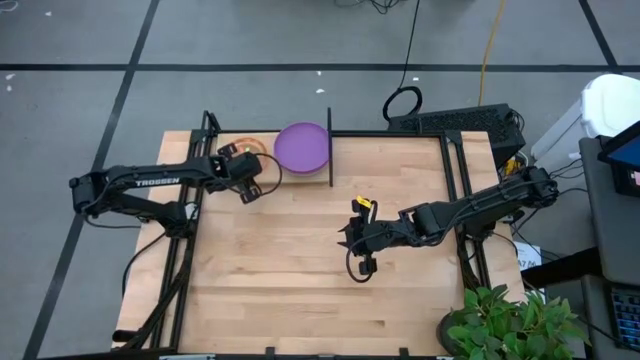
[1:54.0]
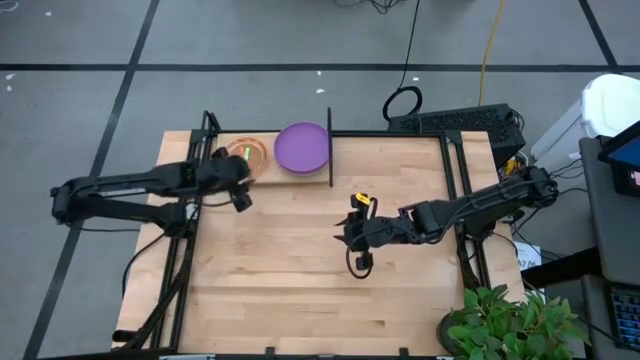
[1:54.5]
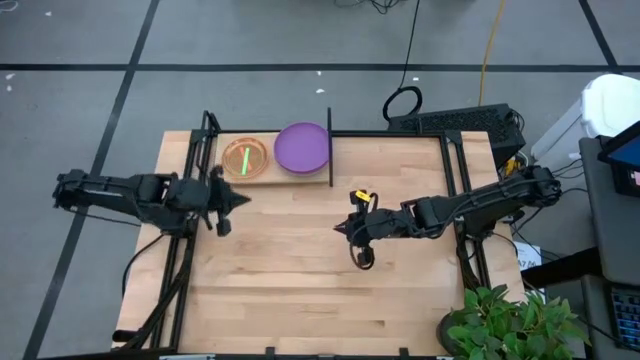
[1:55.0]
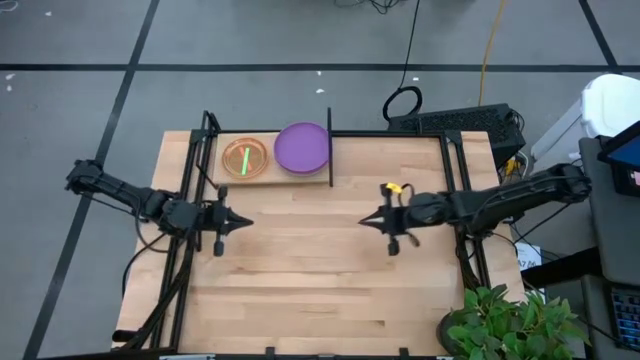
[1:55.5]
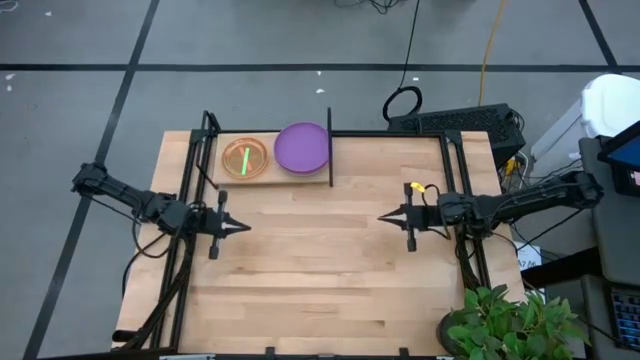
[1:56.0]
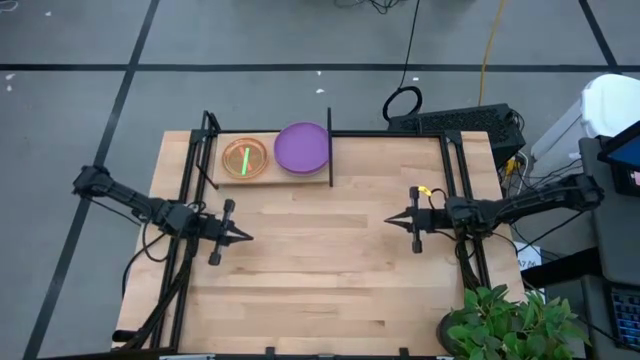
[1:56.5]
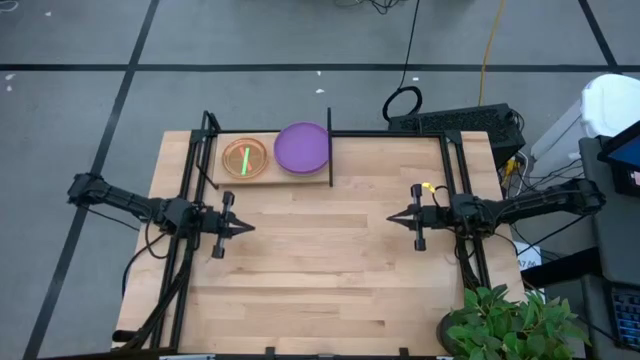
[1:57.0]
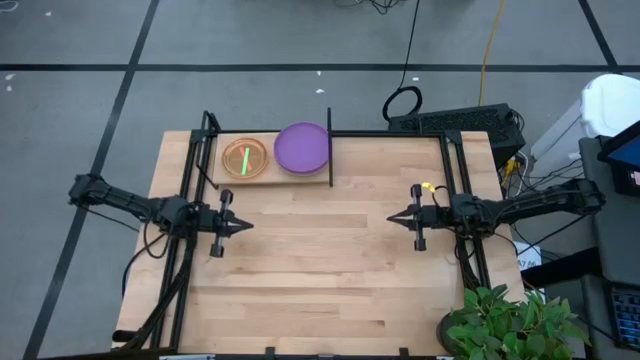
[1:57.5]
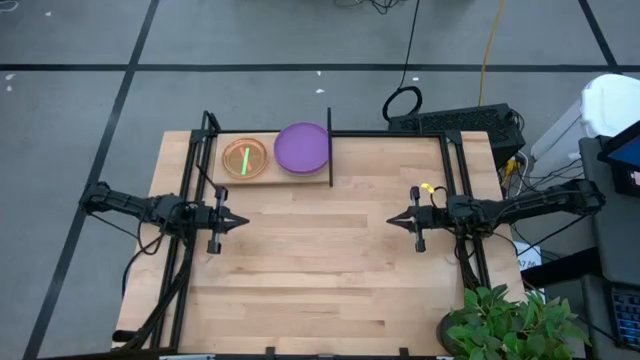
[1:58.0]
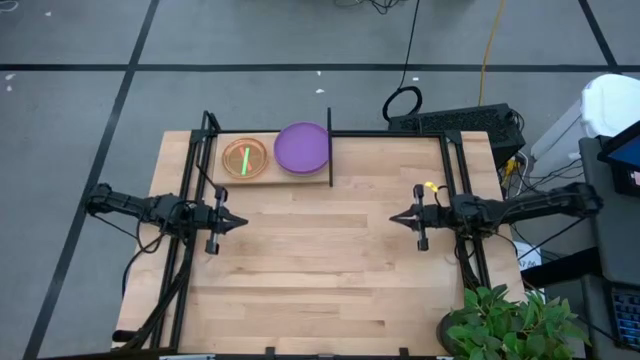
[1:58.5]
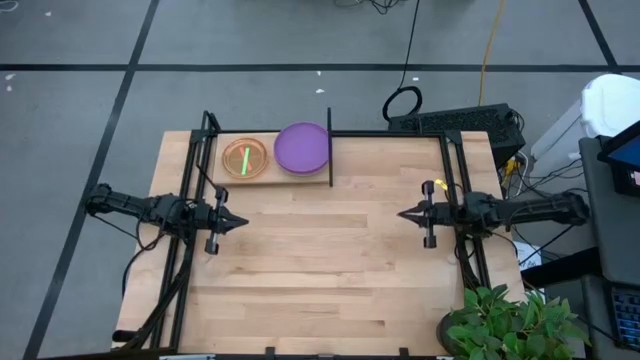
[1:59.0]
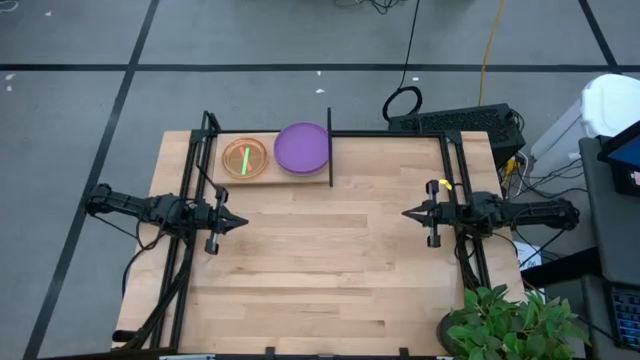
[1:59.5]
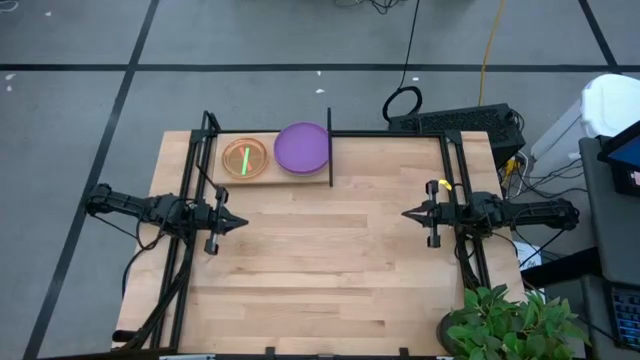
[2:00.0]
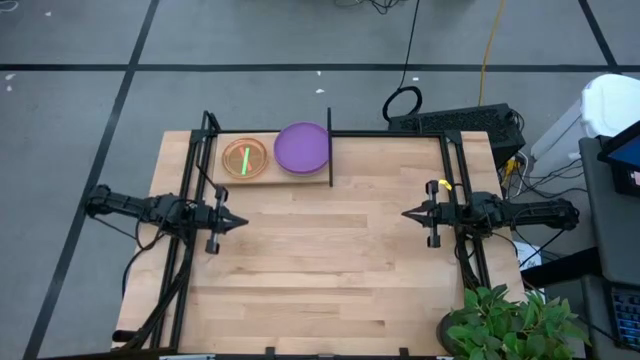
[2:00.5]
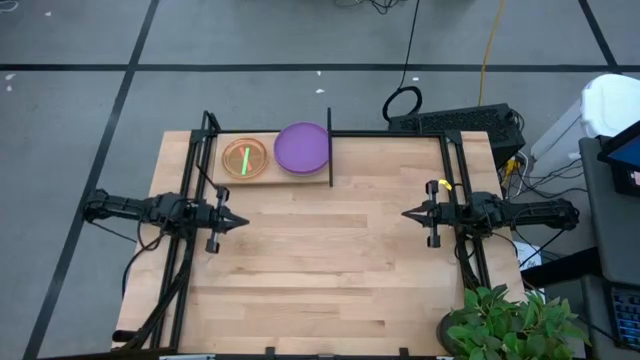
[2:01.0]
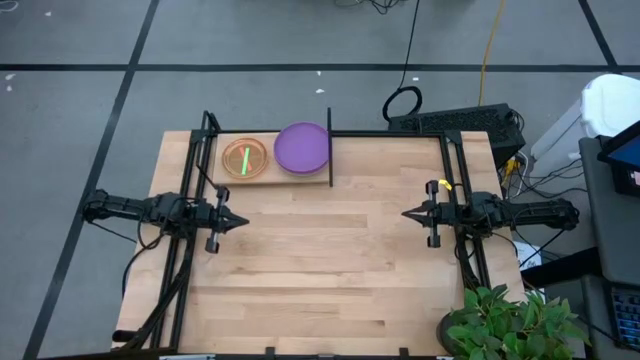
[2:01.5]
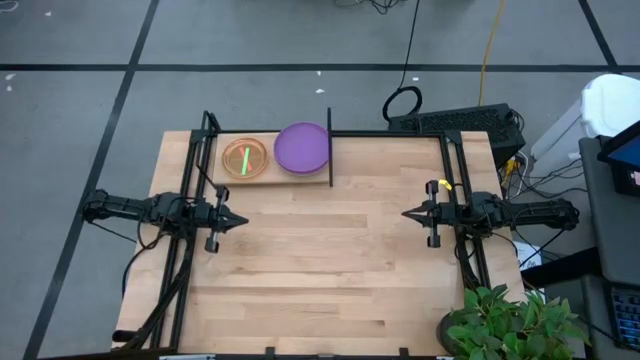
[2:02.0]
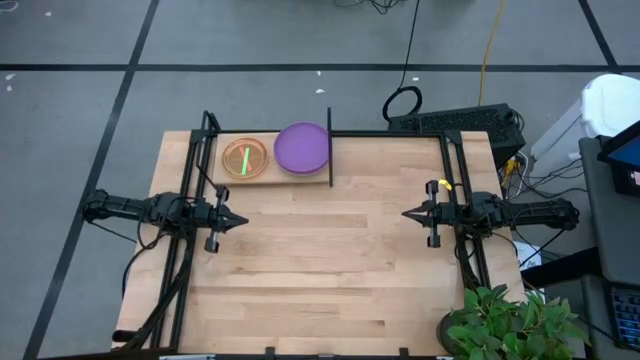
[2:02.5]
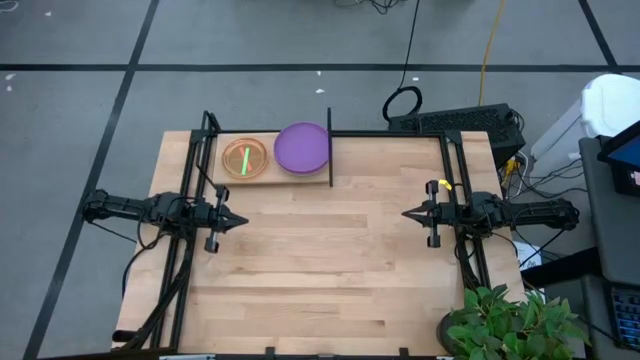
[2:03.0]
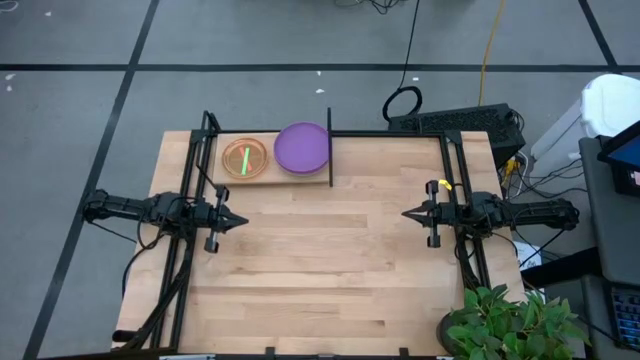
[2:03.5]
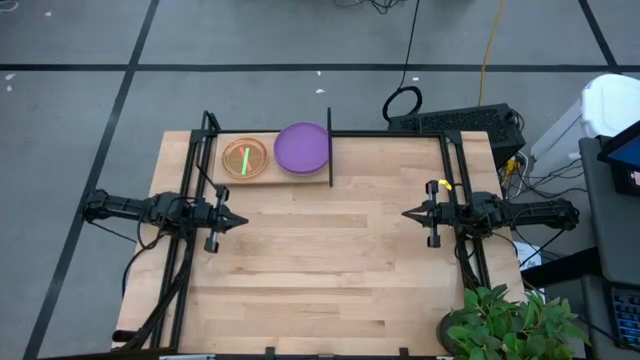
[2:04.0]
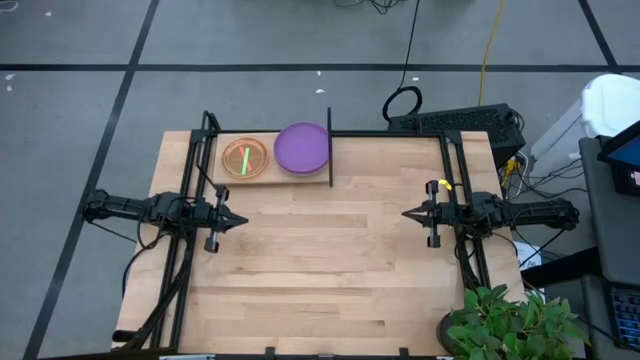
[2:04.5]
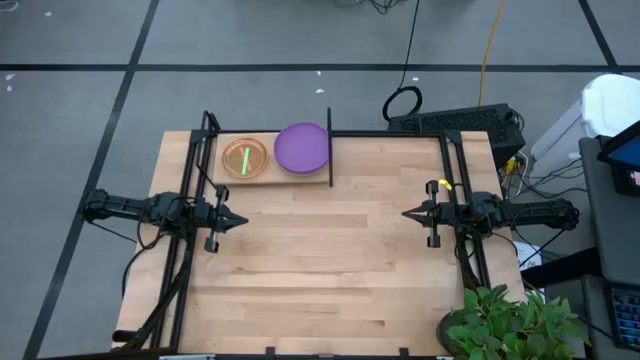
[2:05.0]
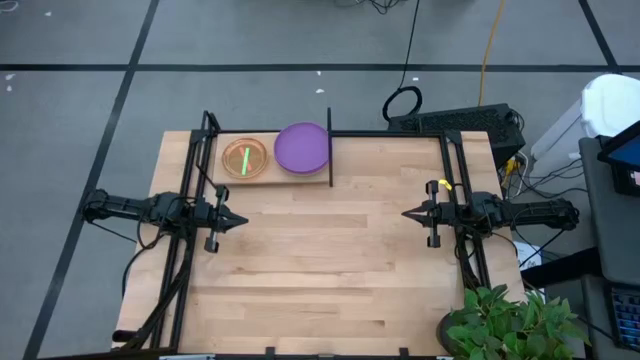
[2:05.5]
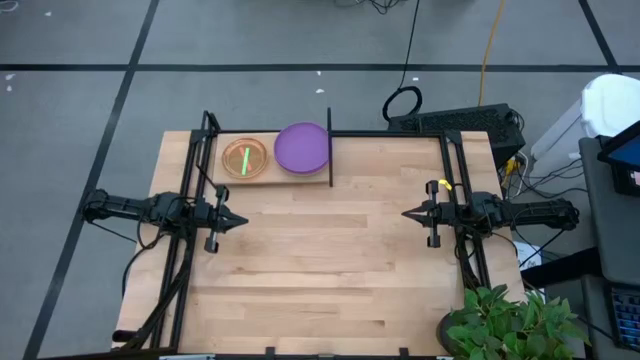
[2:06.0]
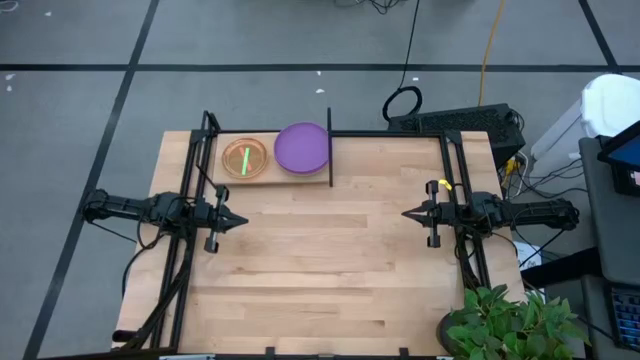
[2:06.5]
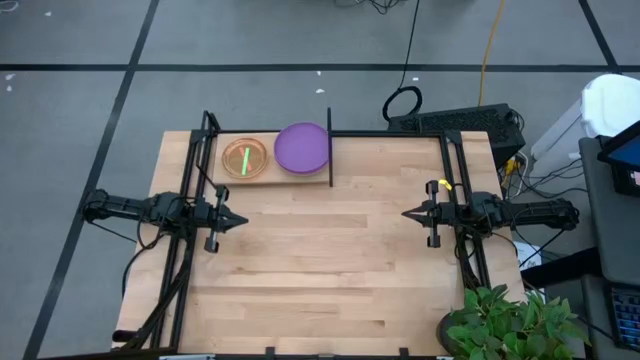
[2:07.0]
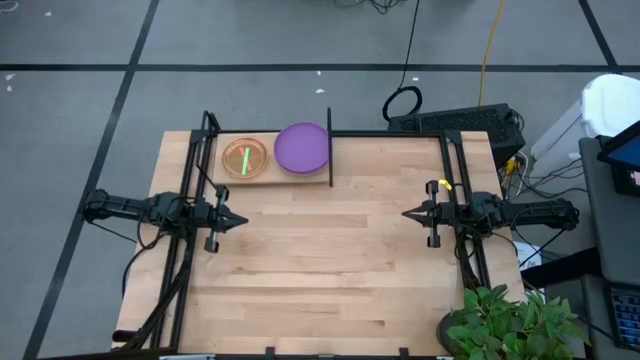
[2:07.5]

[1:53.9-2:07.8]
Task: Place and stack plates onto a shelf
Return to Home Position

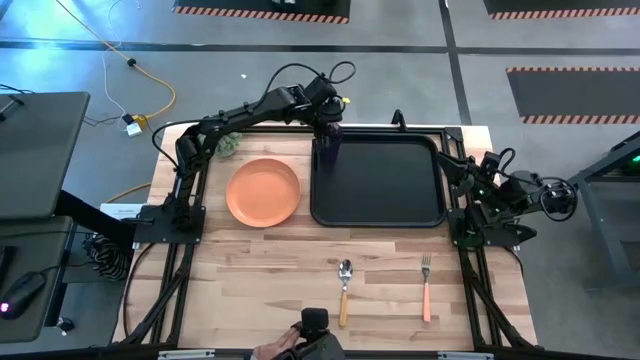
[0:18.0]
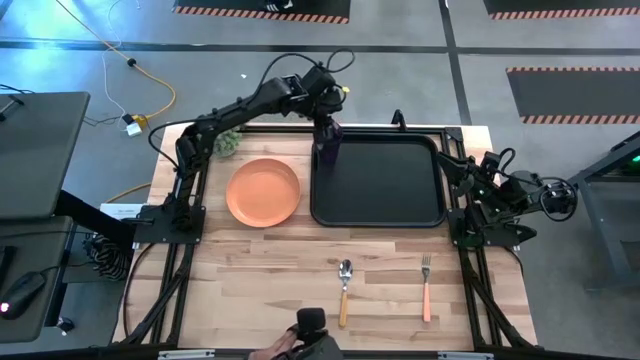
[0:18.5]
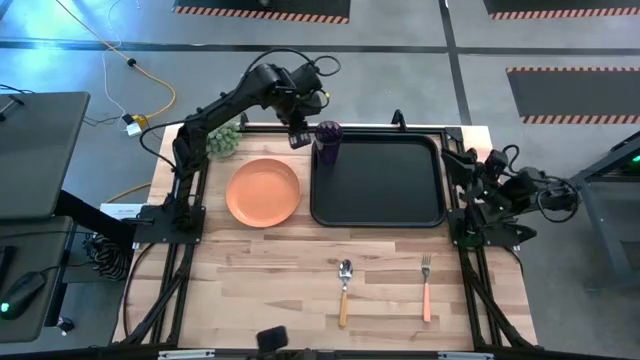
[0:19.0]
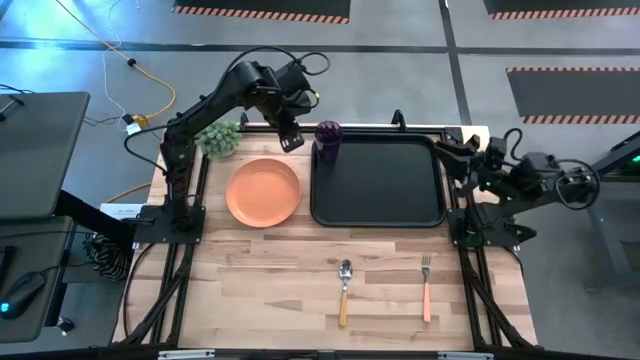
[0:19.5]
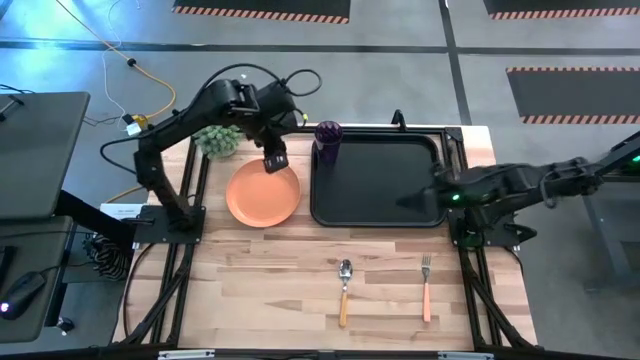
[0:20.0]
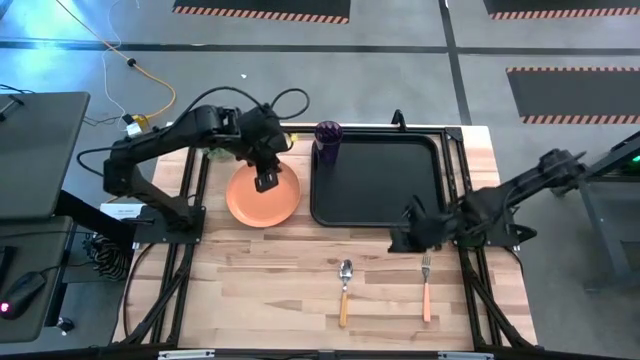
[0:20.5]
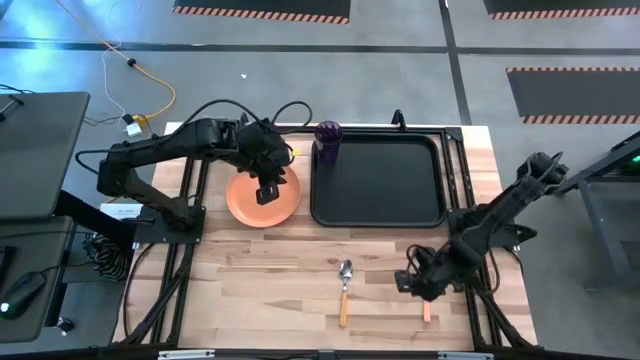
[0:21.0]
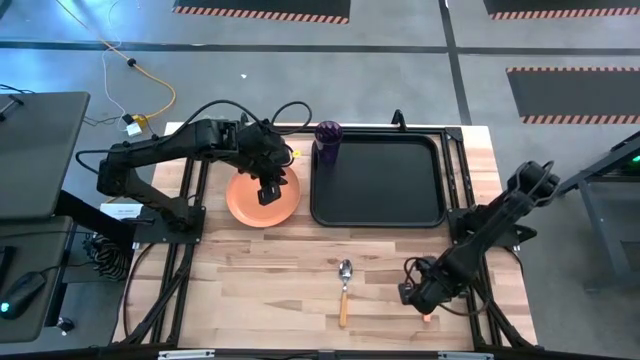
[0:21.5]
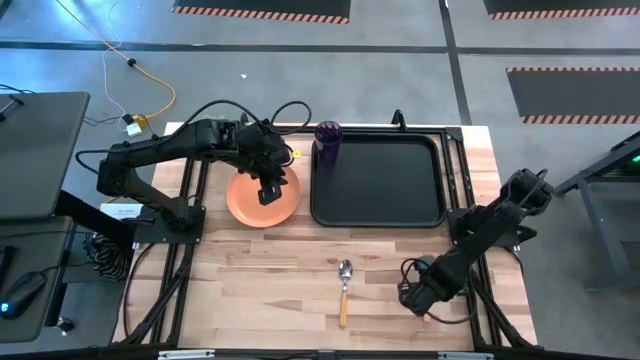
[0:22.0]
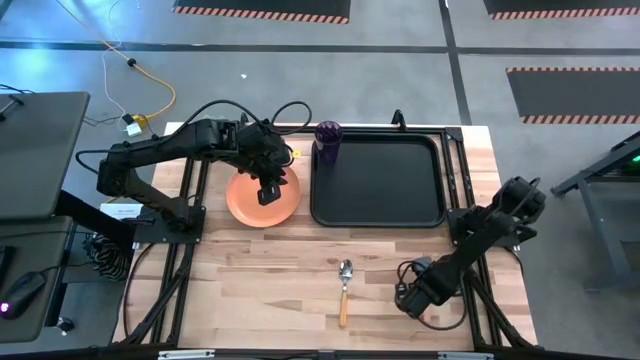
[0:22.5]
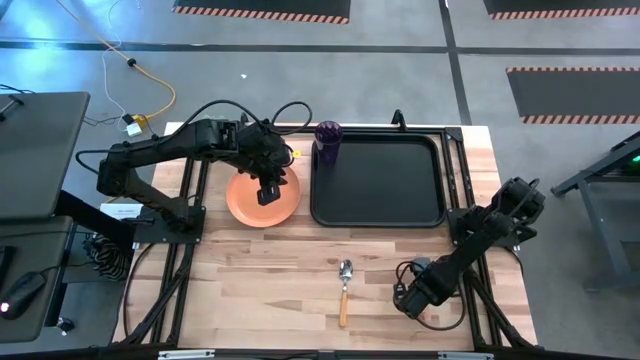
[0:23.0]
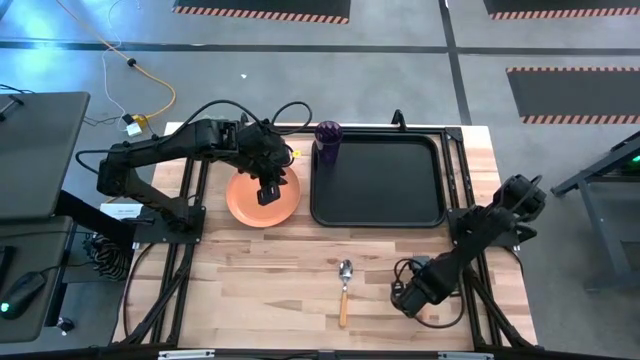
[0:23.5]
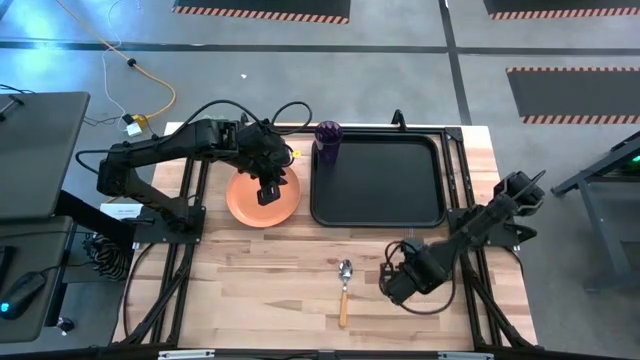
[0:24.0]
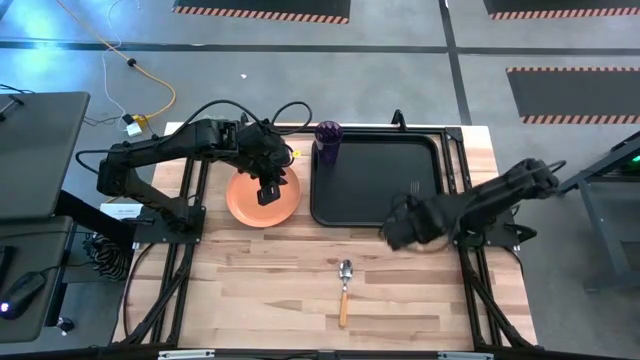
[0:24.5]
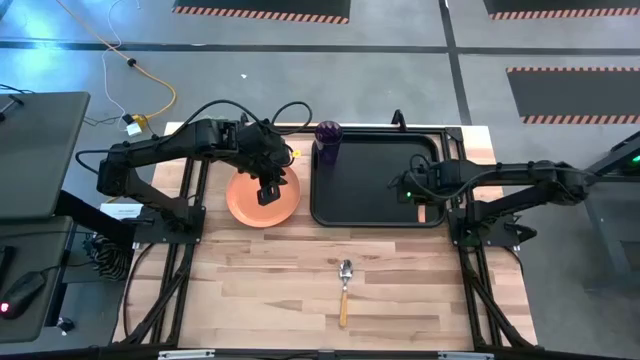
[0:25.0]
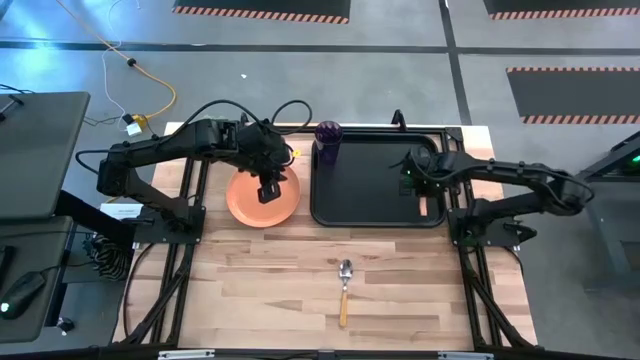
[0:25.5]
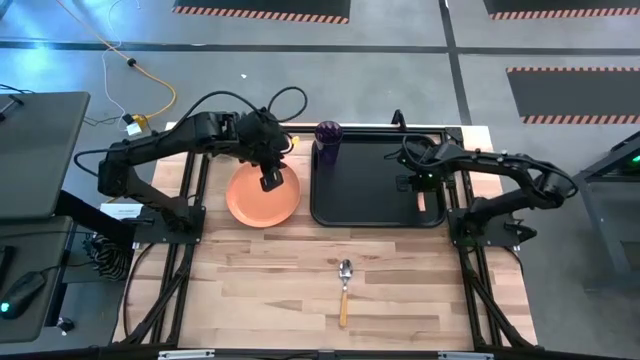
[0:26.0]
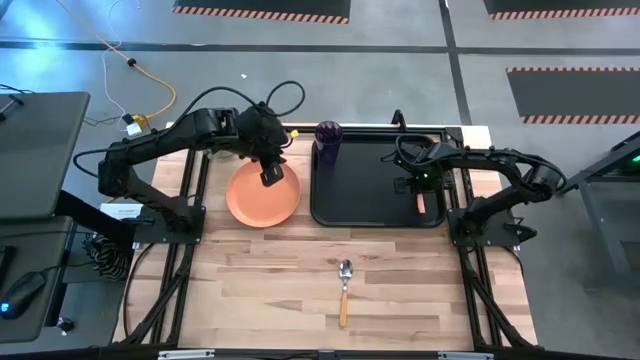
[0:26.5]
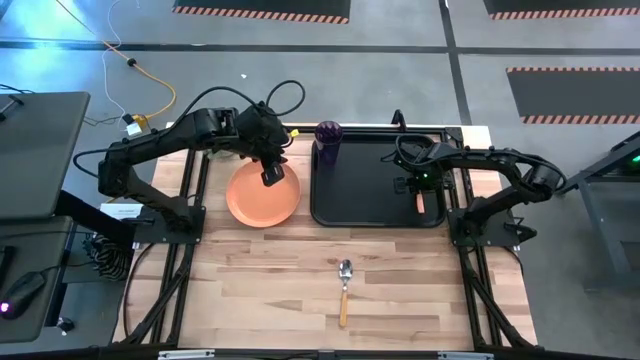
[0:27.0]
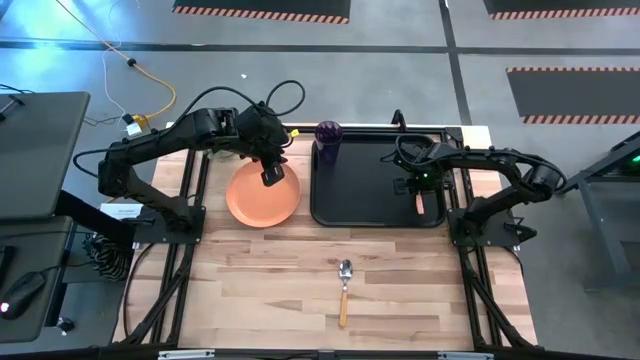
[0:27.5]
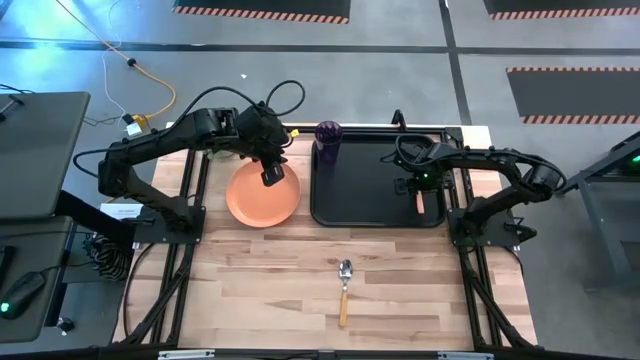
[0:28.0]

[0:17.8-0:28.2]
Task: Pick and place plate/cup/fork/spoon on tray
Put the orange fork to the left side of the black serving tray
